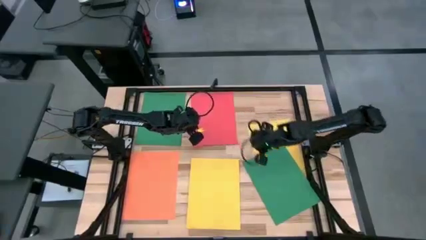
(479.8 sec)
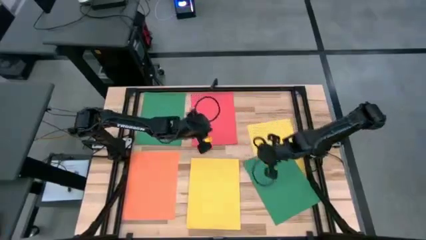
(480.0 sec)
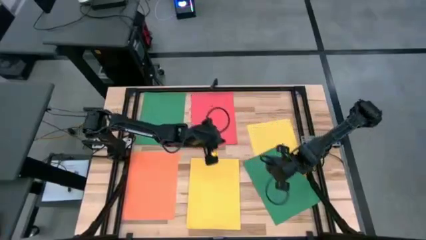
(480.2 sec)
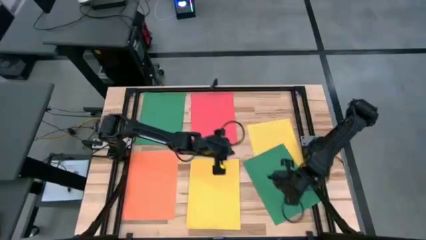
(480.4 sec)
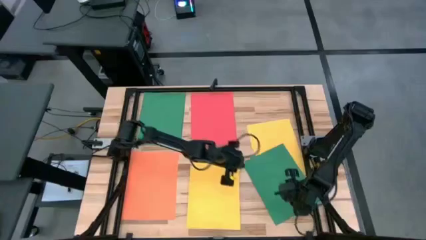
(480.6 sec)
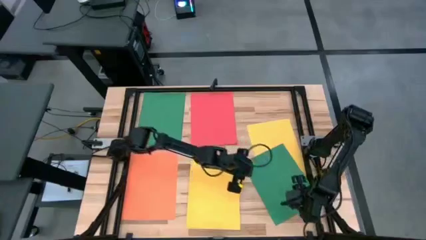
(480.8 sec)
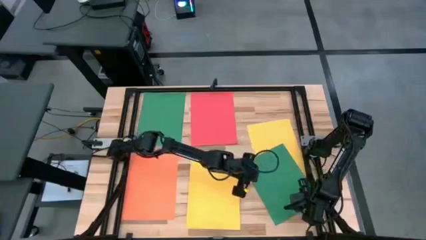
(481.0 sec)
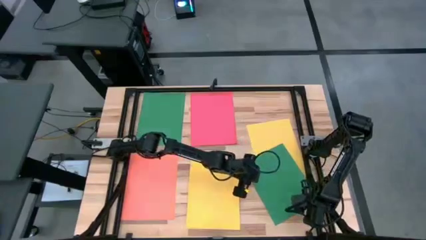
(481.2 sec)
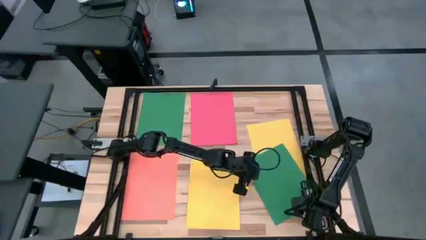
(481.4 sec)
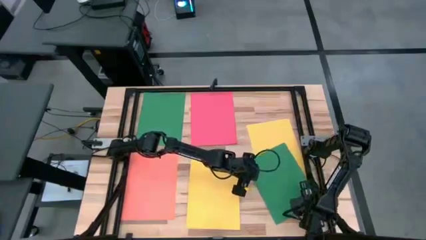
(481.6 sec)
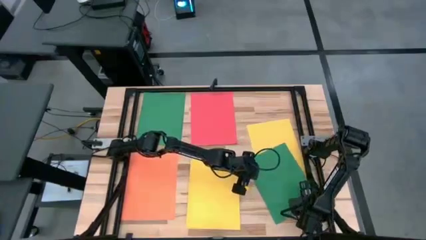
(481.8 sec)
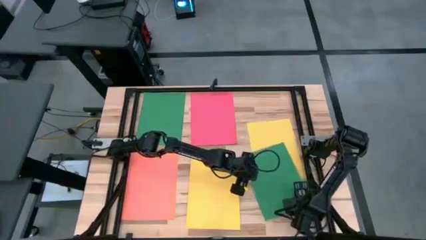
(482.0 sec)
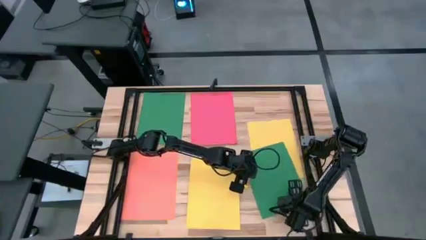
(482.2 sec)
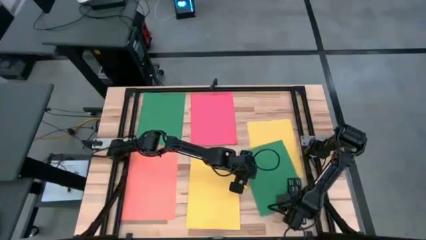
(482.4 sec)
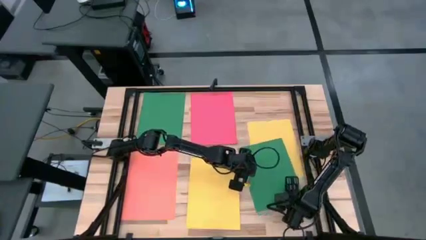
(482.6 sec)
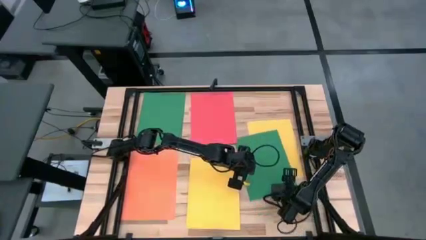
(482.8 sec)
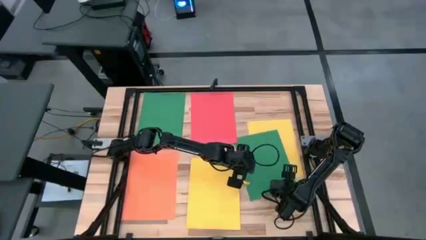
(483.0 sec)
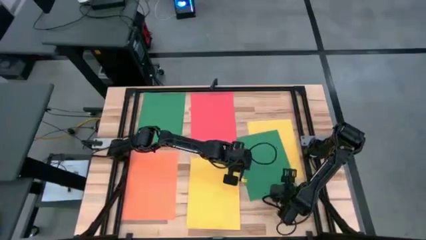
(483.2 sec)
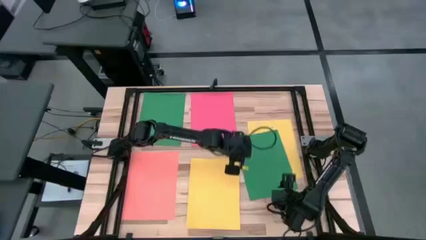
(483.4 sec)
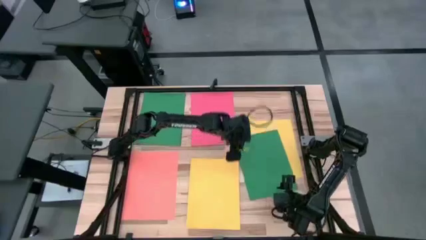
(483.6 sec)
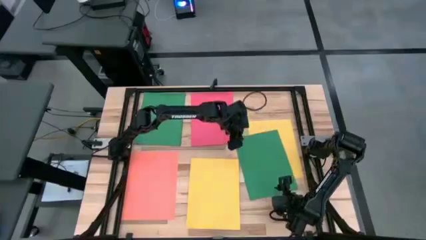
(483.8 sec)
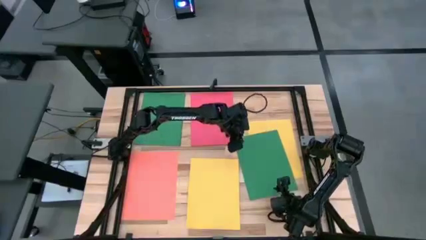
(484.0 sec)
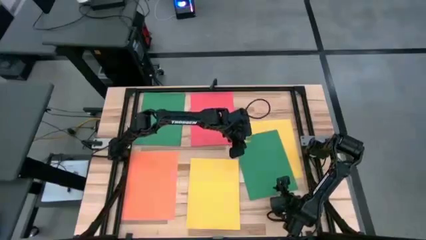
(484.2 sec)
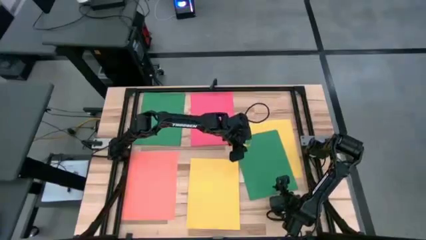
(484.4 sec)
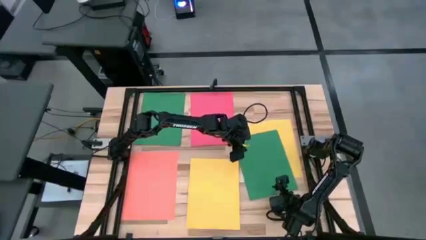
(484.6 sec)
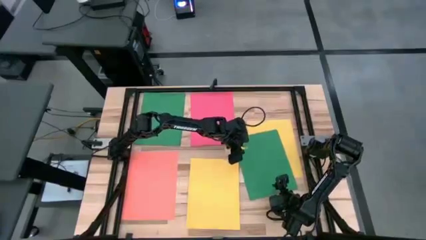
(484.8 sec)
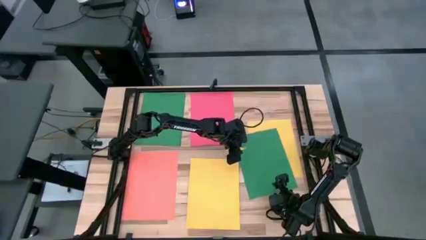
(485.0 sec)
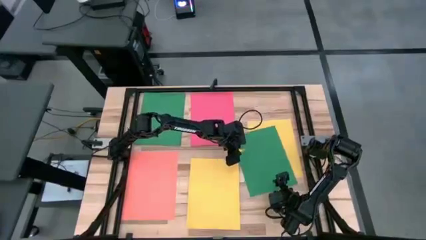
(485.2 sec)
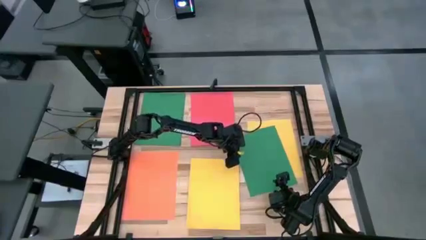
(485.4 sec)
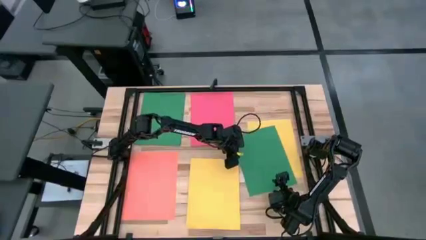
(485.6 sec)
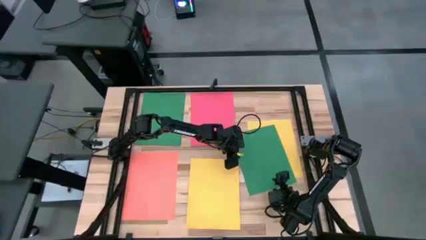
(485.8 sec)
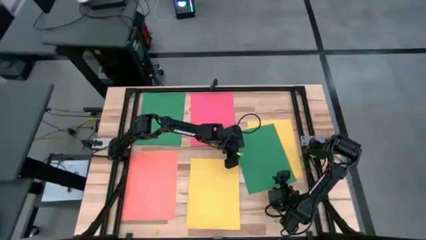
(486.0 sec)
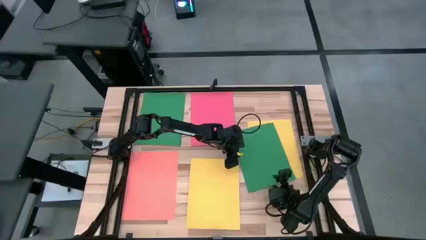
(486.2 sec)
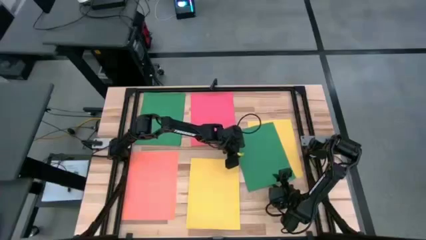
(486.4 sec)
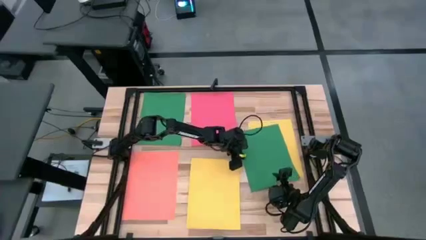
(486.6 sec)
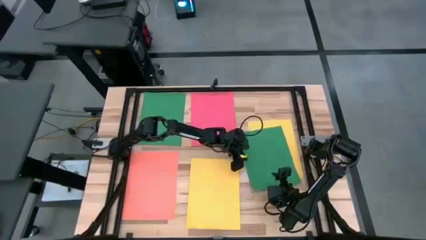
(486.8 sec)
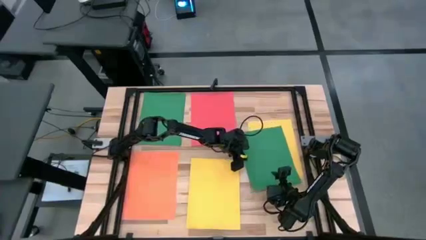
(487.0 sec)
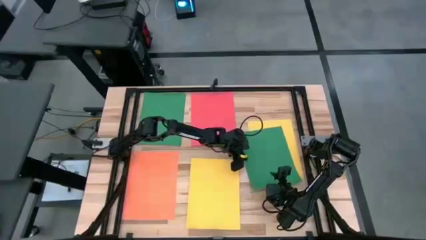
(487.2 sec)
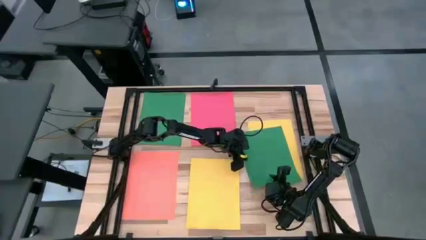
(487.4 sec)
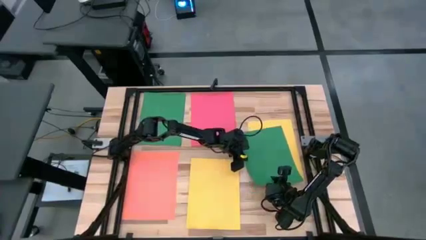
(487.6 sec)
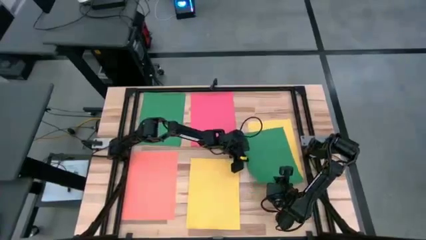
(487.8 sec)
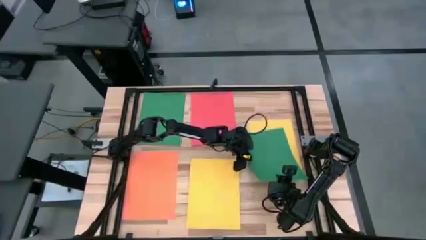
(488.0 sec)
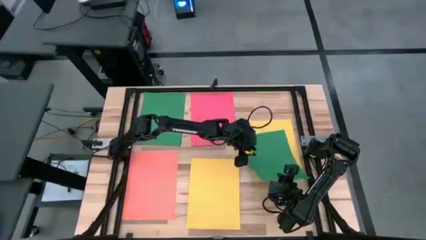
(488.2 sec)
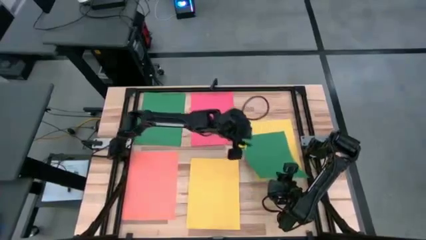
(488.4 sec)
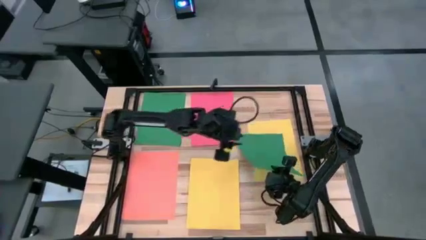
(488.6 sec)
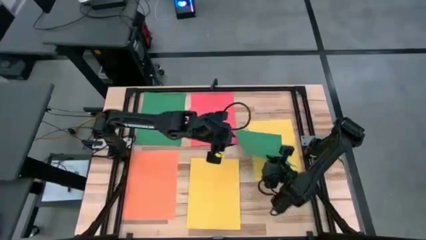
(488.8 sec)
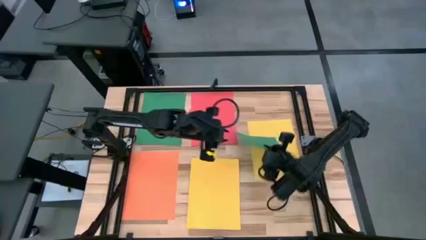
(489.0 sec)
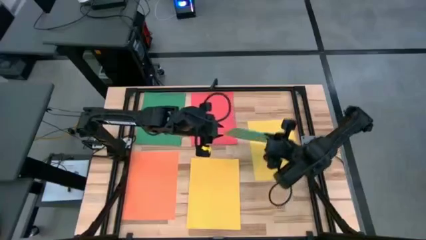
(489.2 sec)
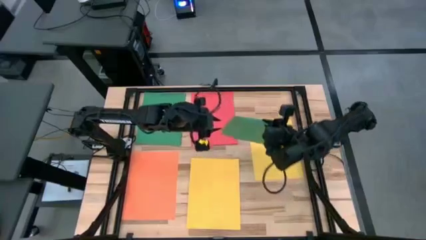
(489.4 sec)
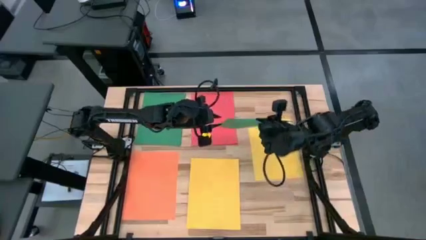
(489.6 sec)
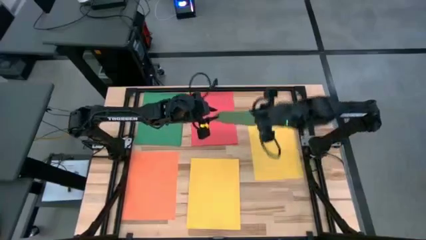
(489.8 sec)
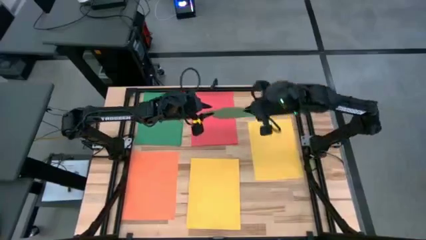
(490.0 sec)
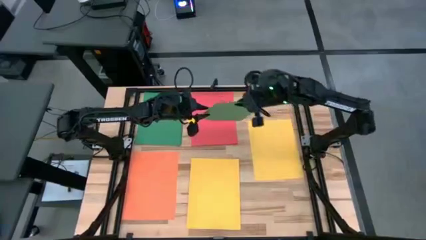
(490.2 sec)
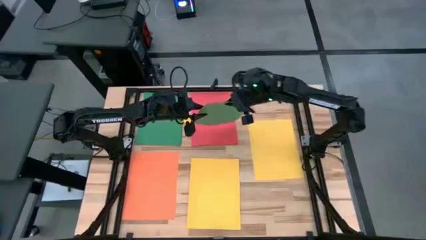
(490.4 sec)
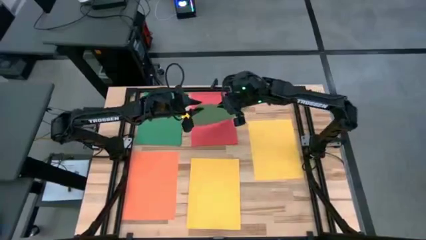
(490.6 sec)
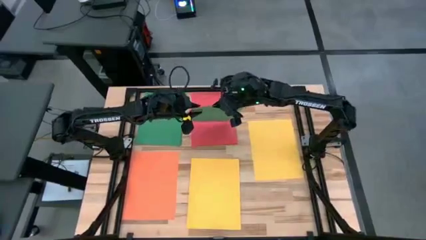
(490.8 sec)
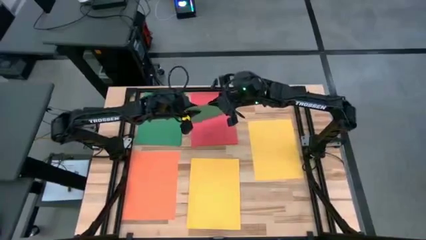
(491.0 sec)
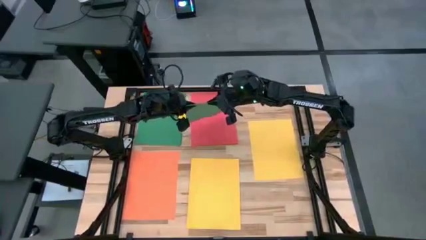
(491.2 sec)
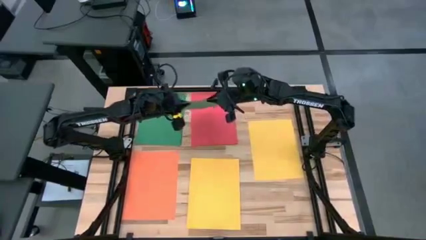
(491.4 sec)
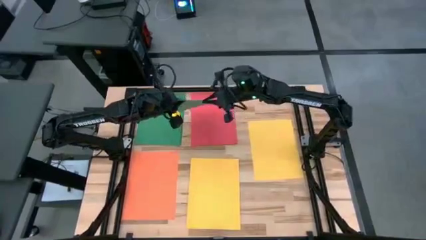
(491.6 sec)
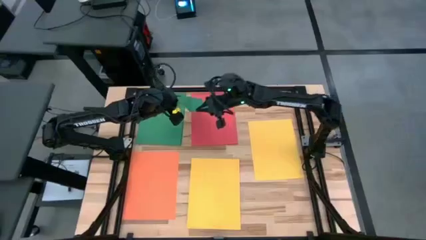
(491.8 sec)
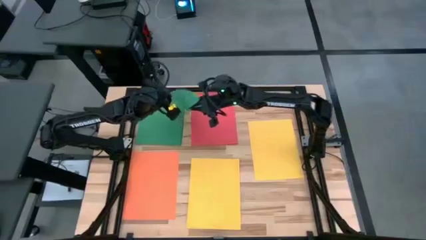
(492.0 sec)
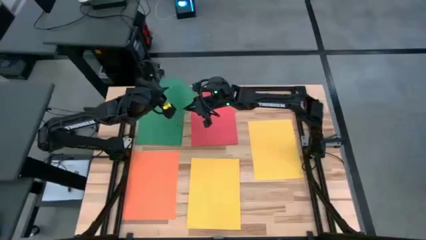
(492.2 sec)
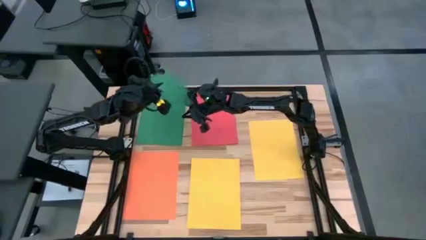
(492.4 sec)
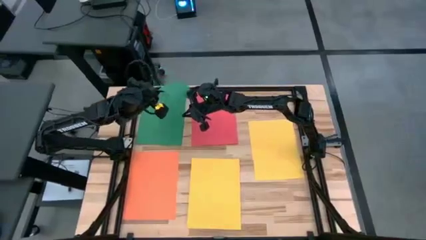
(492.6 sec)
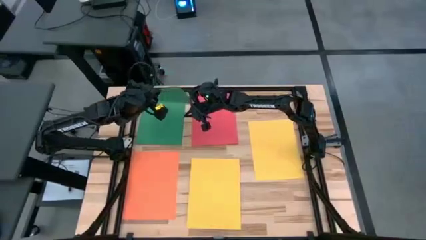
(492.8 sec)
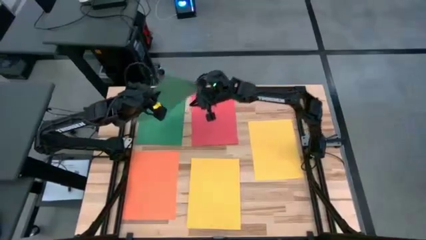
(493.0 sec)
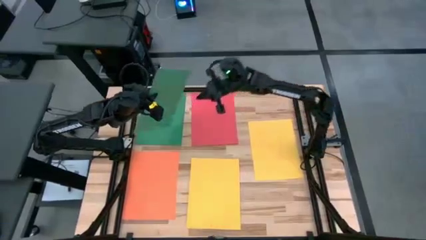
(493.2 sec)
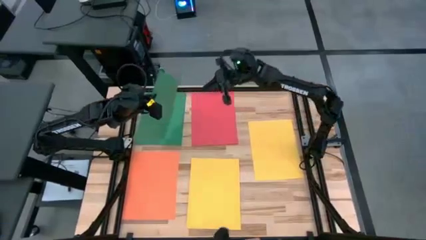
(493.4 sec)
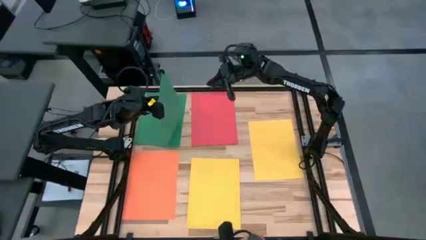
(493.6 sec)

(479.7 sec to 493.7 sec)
Task: Organize paper
Stack the green paper on top of the green paper
